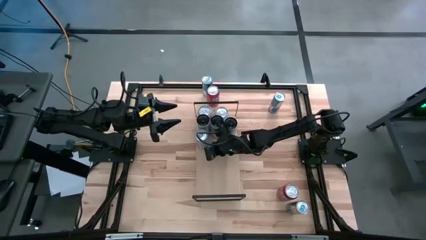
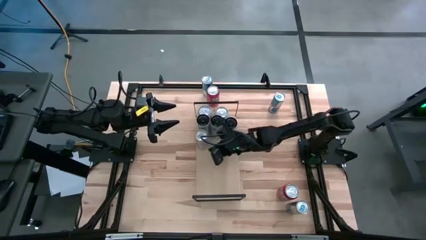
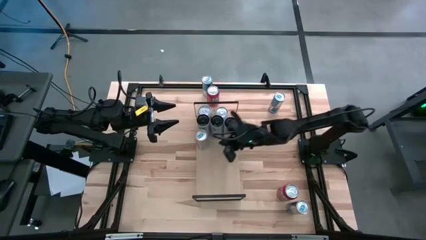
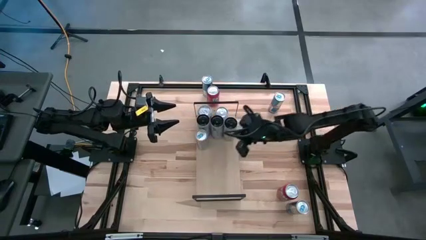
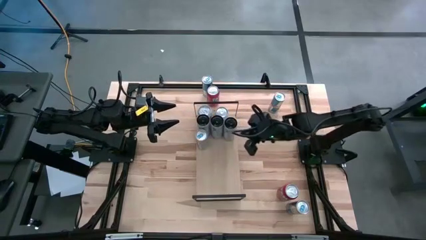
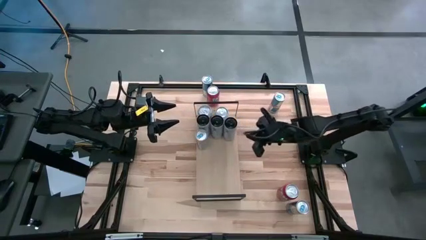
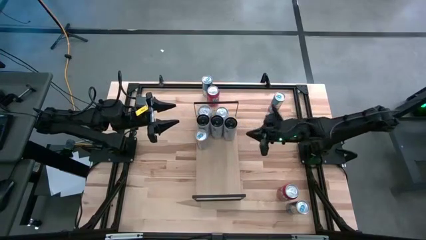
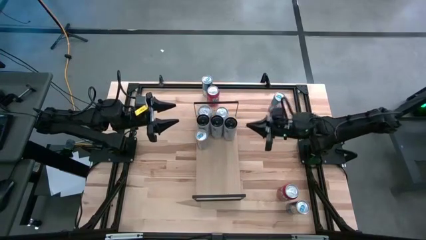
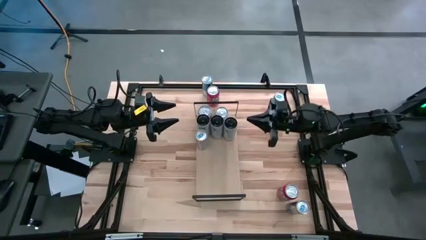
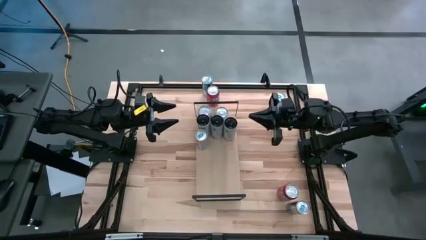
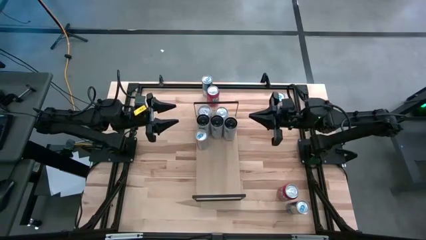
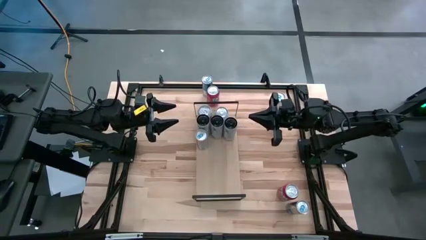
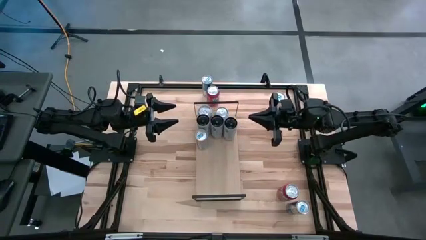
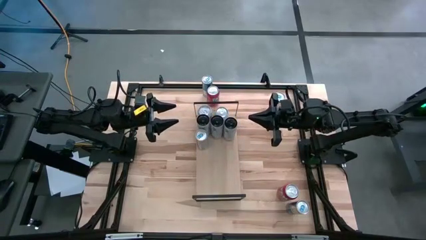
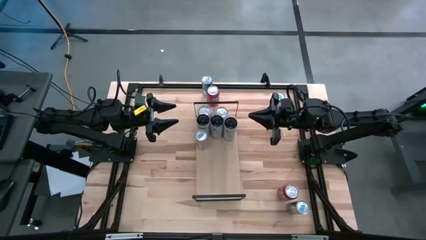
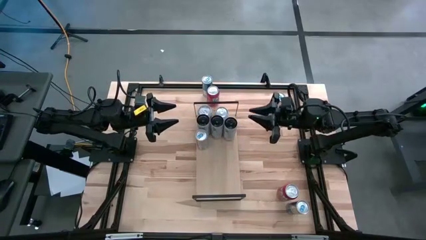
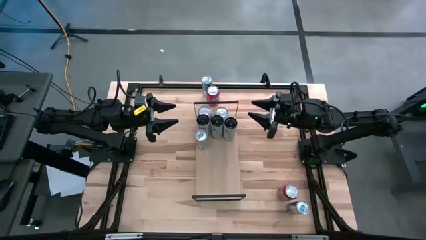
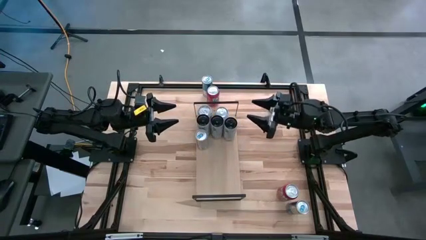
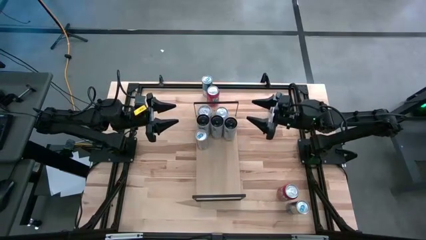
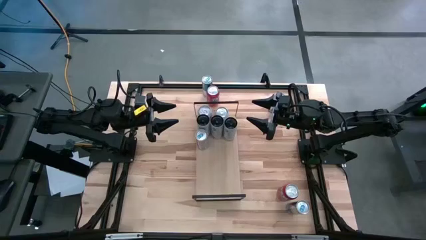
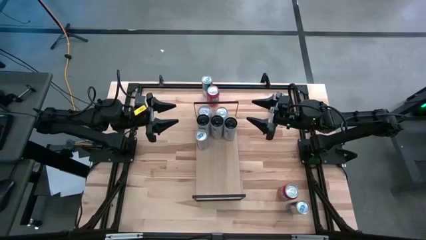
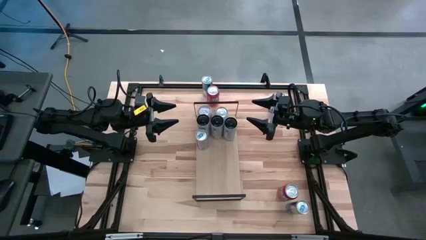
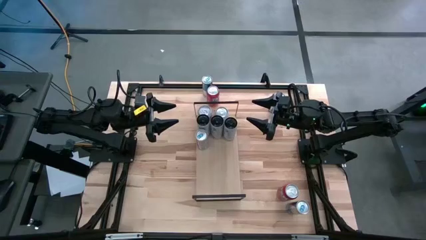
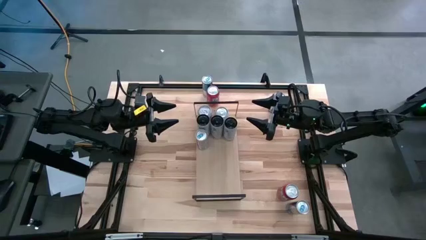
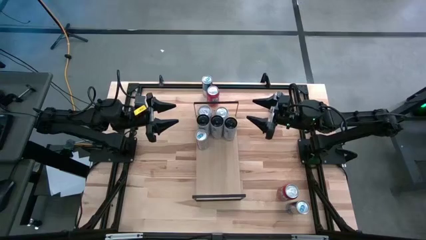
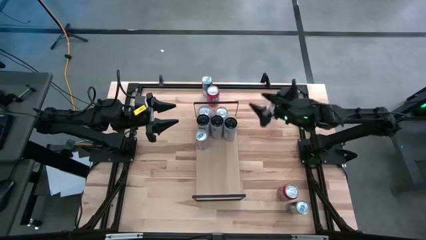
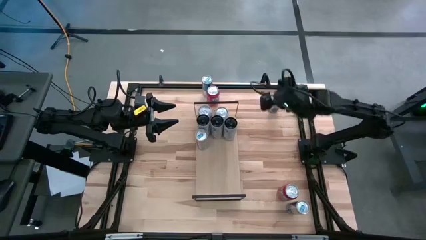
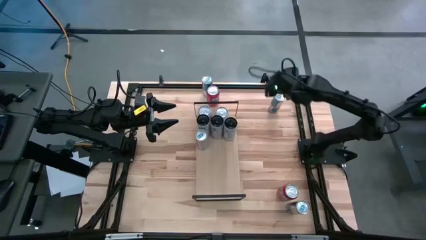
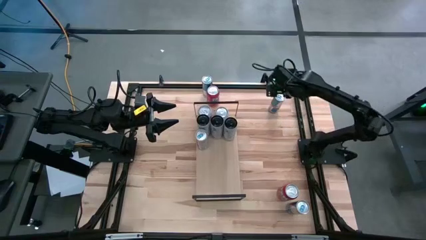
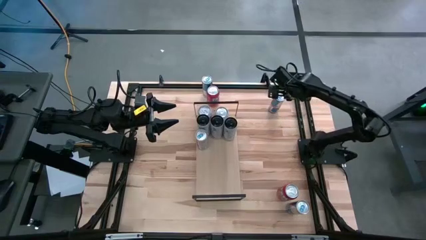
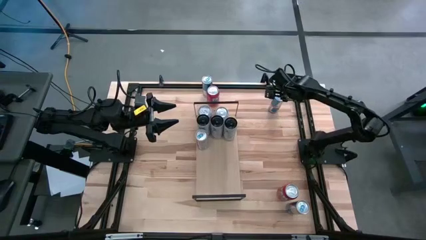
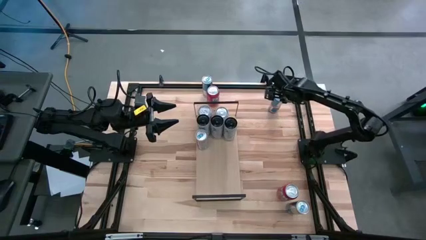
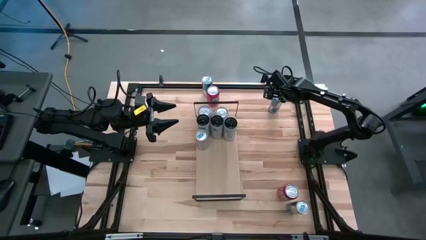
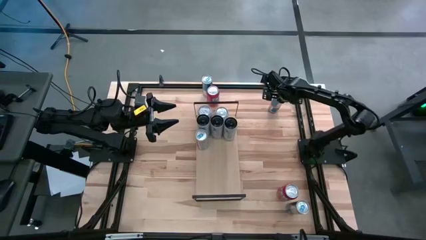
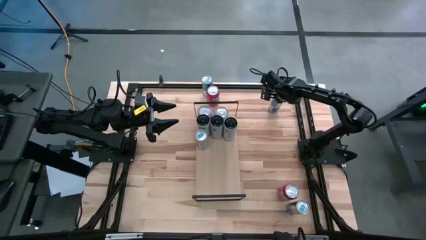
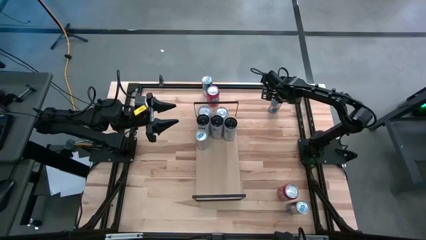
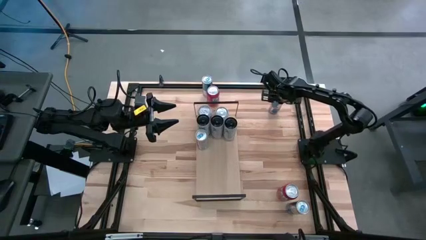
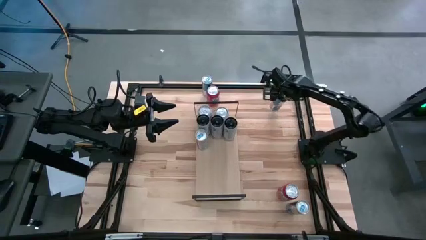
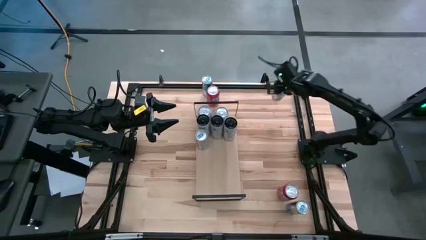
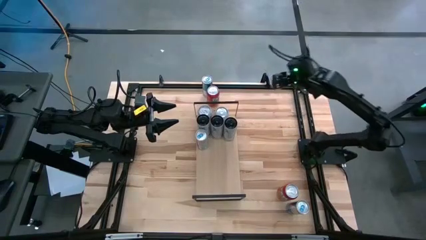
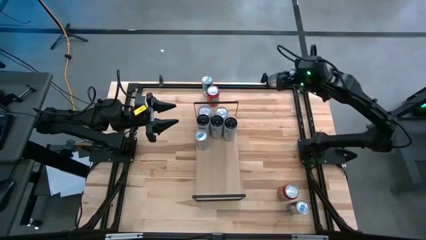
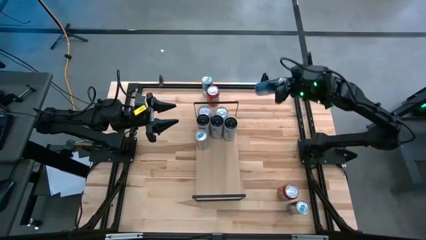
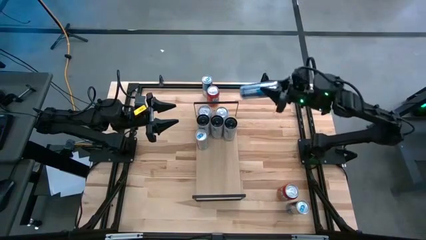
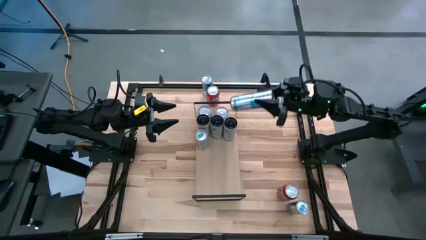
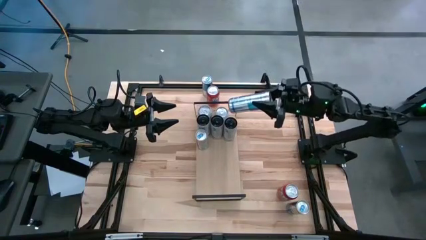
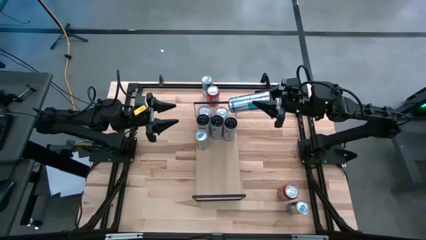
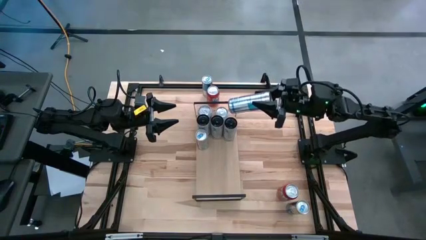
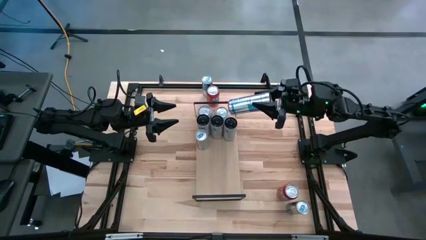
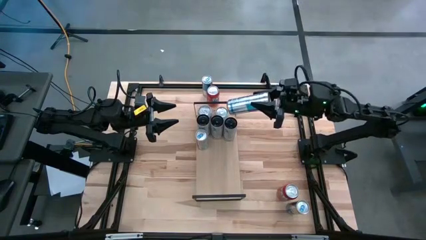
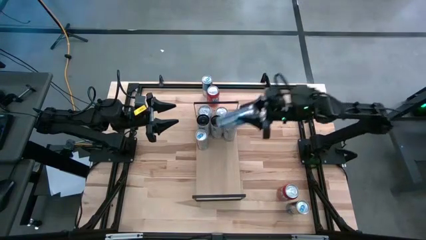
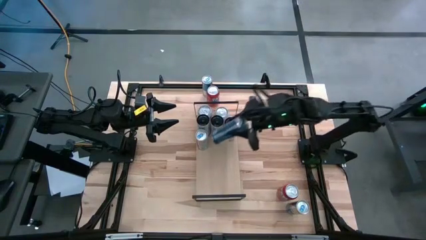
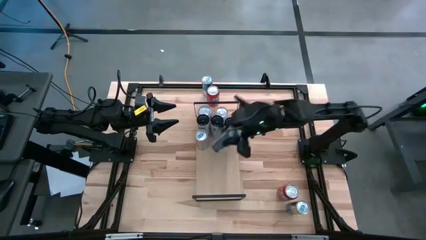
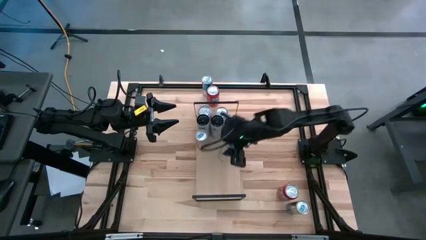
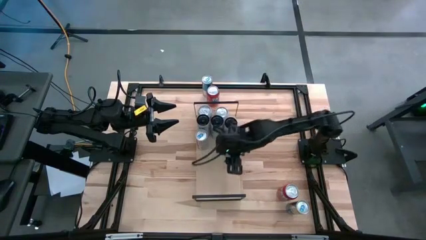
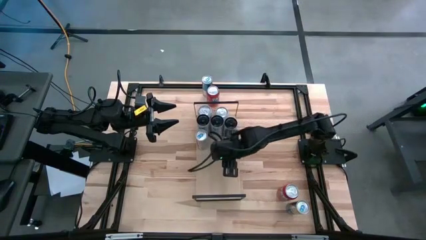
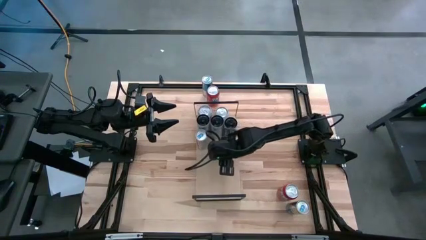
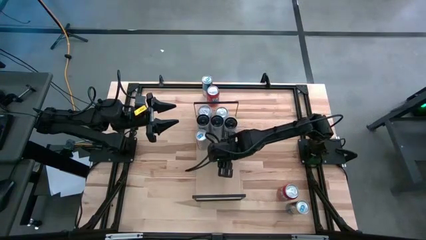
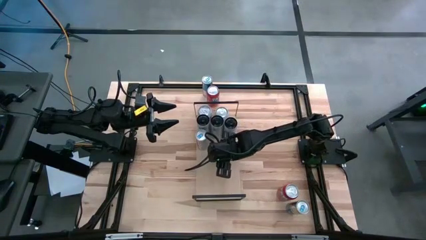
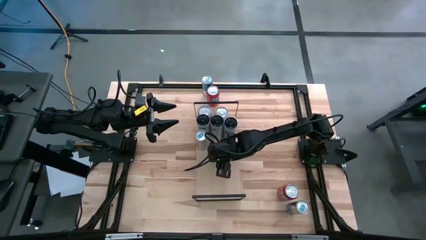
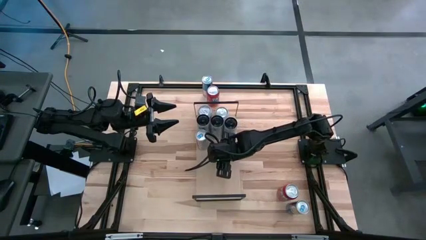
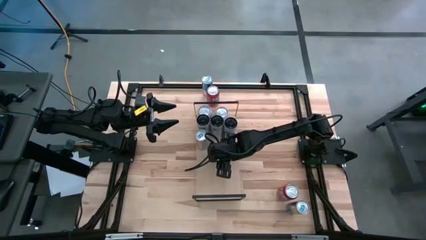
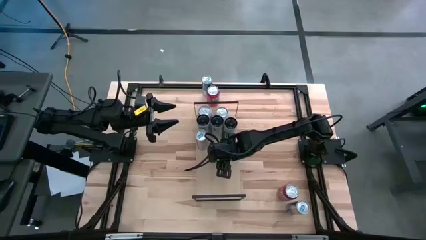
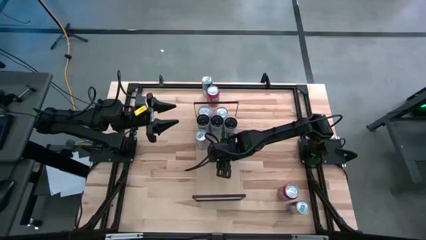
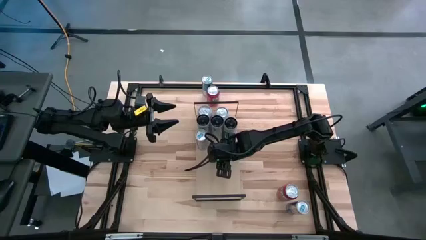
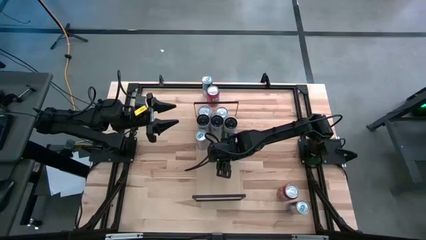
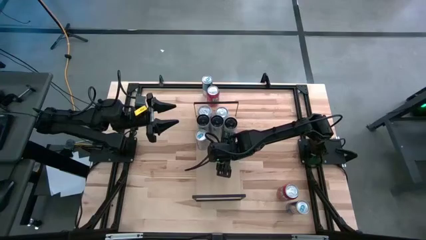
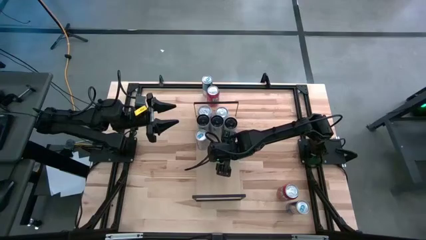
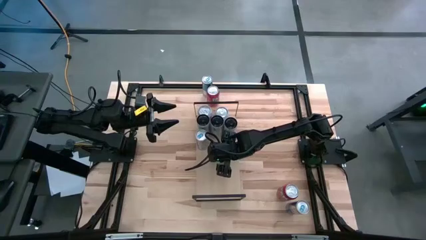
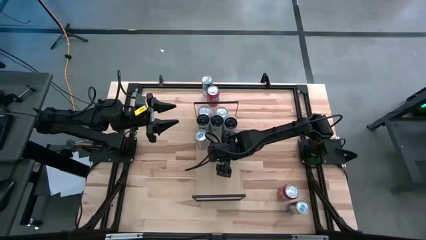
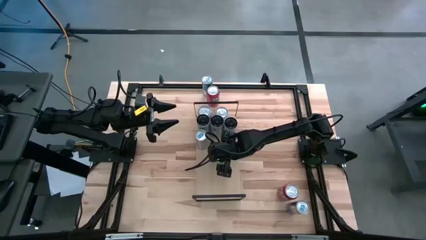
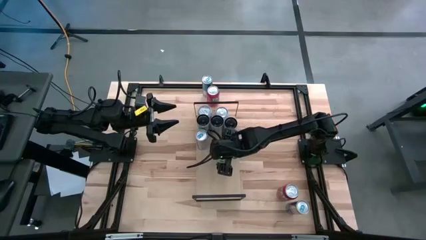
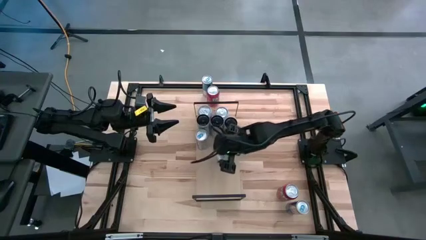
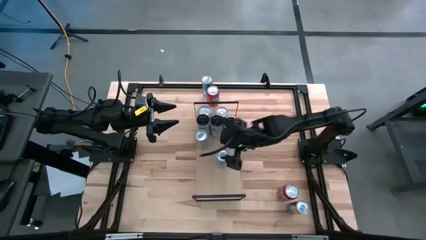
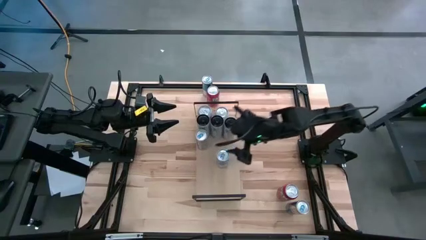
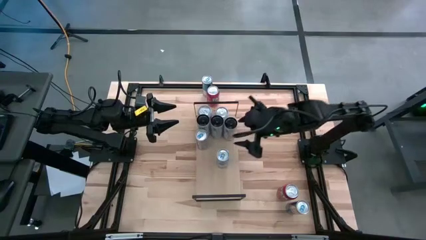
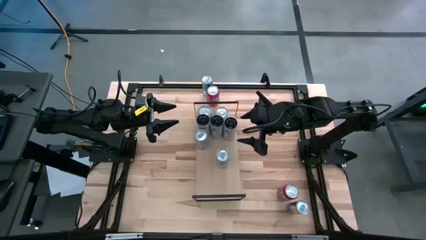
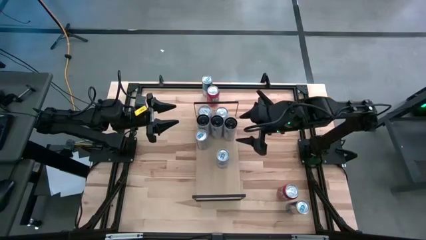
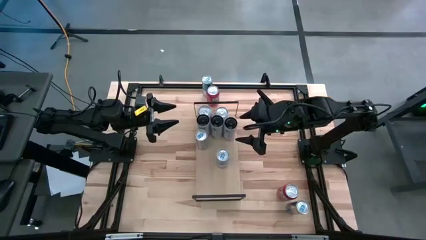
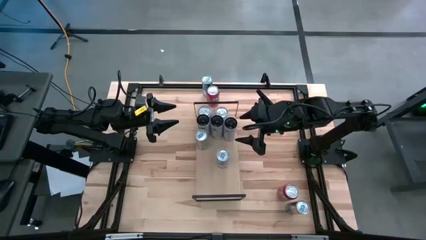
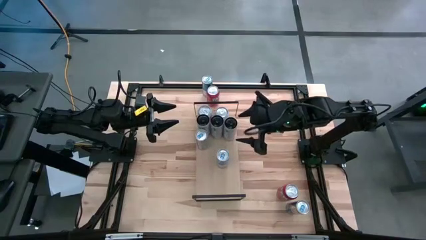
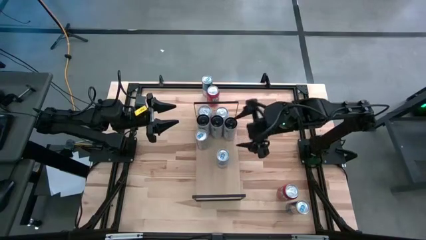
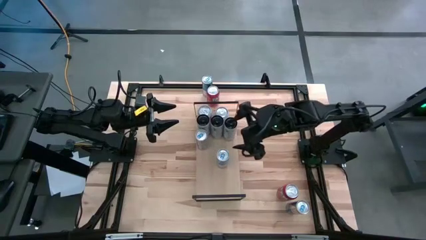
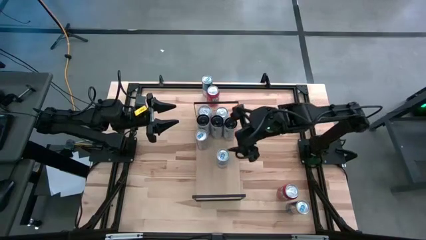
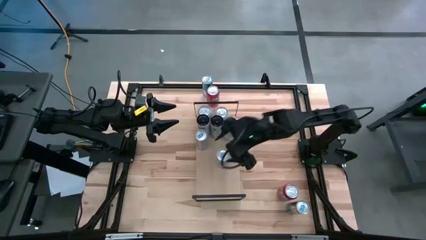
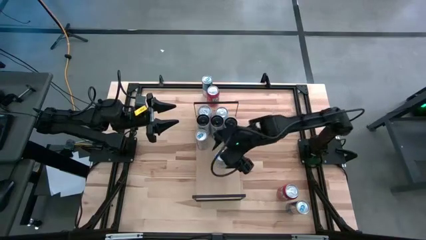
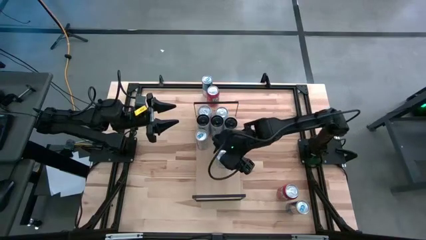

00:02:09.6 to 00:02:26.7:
Task: Place canned beverage on shelf
Put the top right blue soda can on the shelf aligned with the other blue soda can
